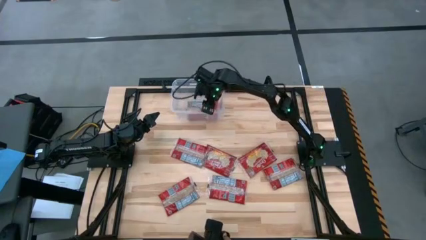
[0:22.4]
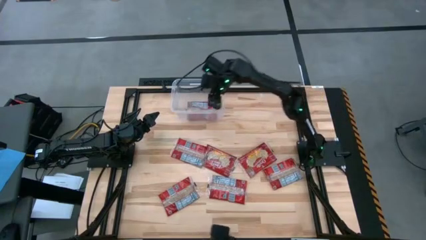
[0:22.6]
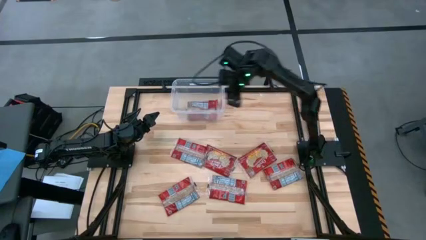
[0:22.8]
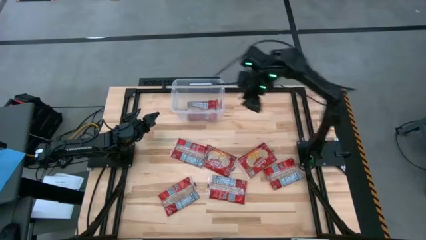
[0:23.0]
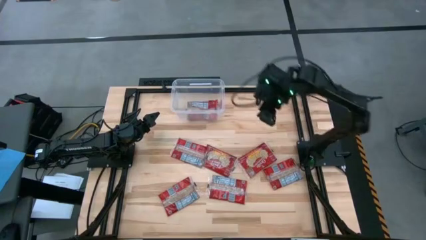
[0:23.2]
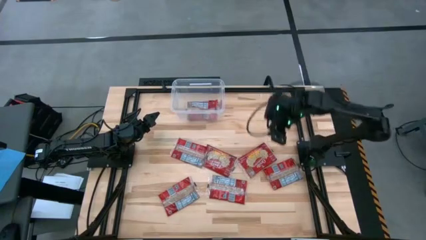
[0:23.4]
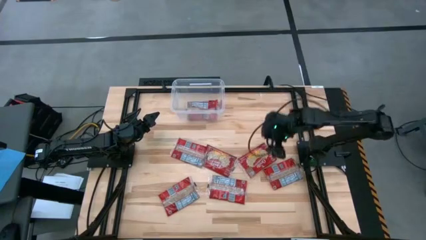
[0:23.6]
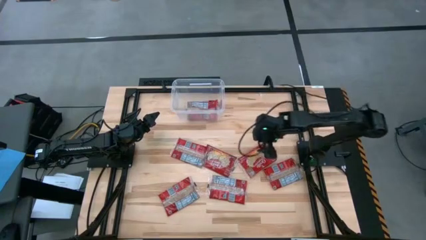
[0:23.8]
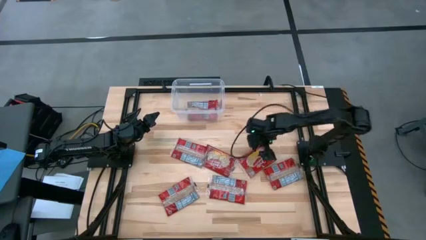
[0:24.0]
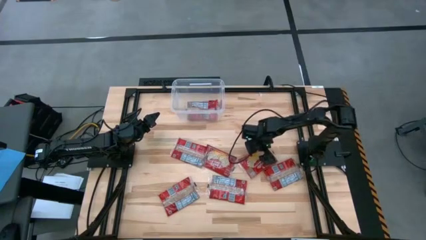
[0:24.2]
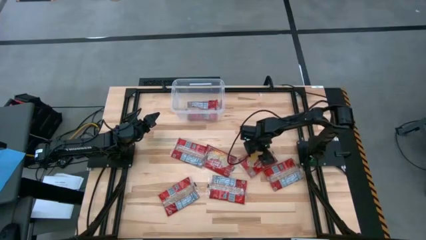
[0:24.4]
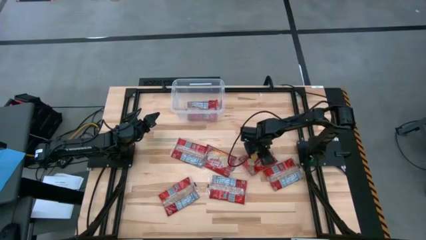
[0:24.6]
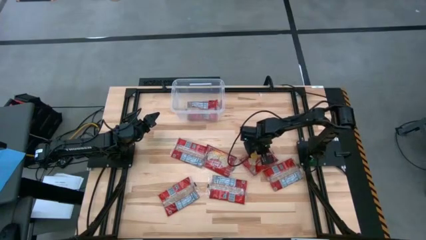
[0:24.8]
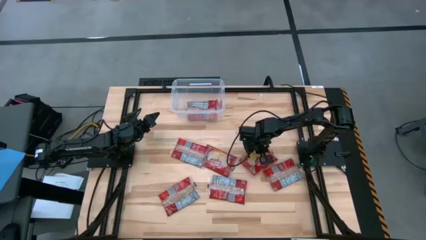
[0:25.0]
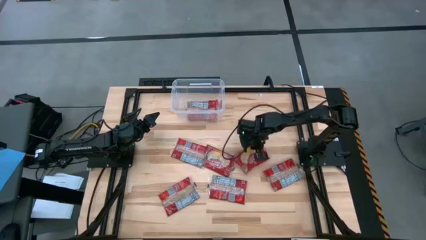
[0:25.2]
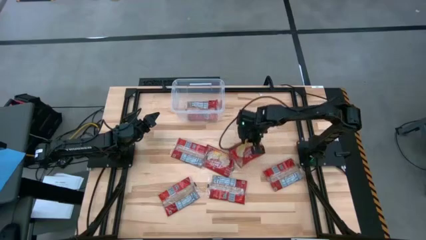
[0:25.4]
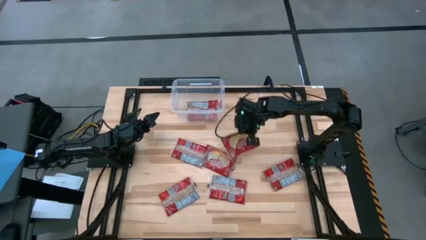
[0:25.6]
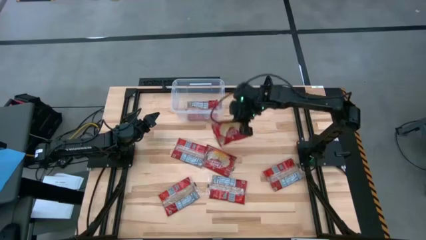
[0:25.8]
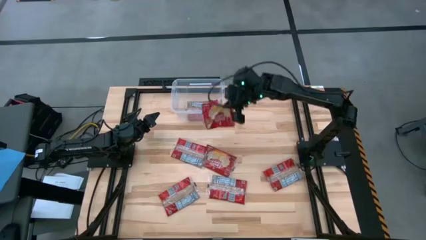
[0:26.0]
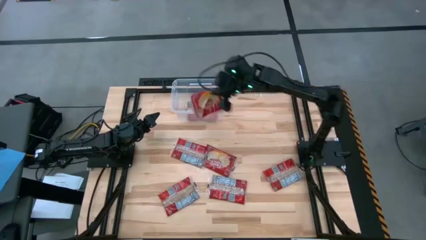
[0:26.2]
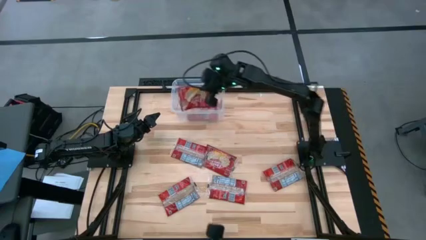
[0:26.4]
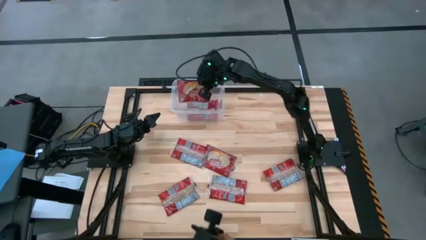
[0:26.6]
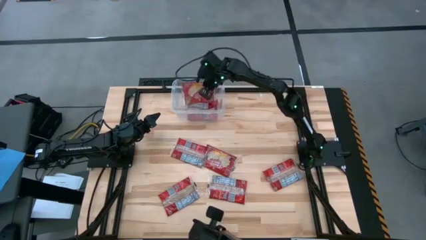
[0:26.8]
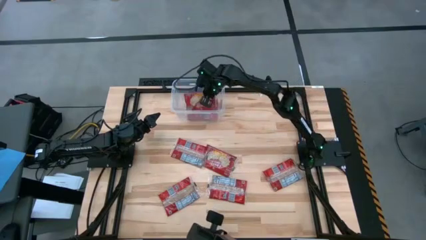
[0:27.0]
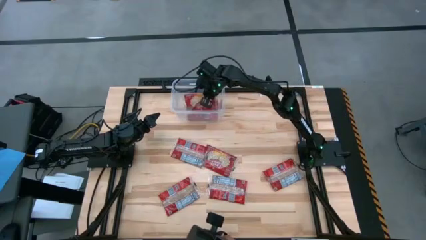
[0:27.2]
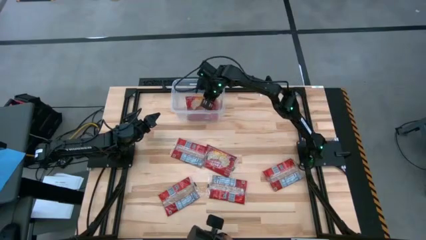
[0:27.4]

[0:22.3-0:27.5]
Task: Sort popcorn bags into baskets
Put the red popcorn bag into the transparent bin

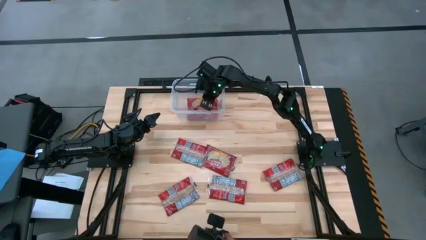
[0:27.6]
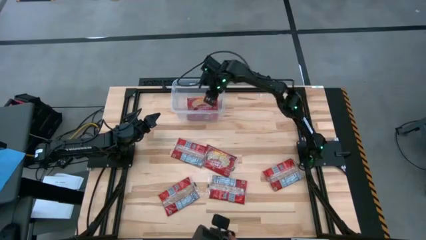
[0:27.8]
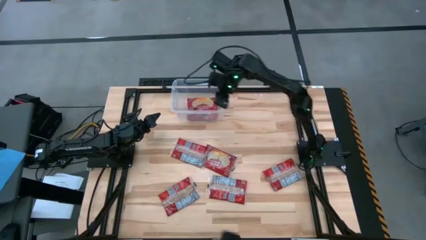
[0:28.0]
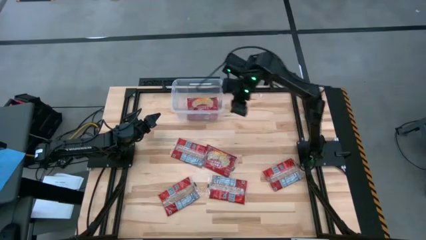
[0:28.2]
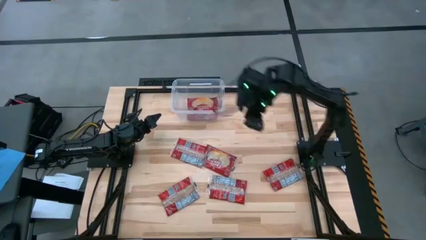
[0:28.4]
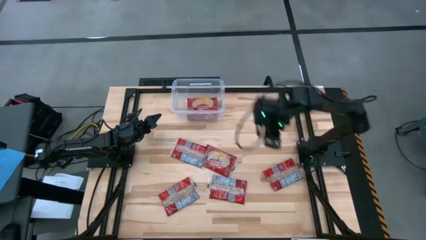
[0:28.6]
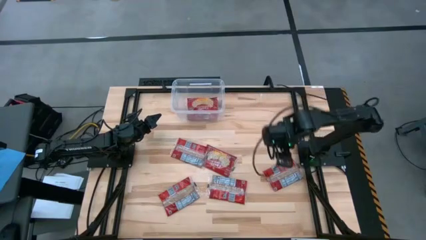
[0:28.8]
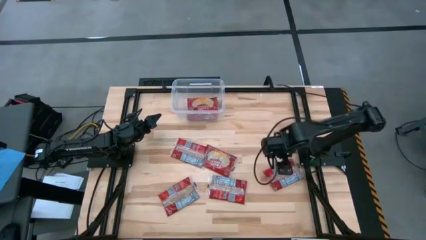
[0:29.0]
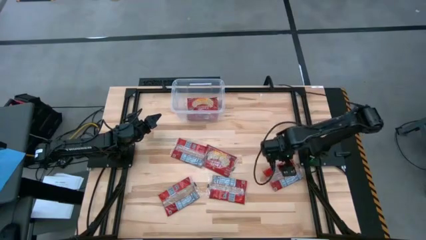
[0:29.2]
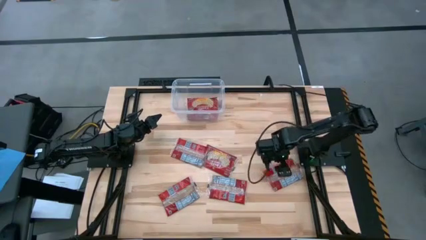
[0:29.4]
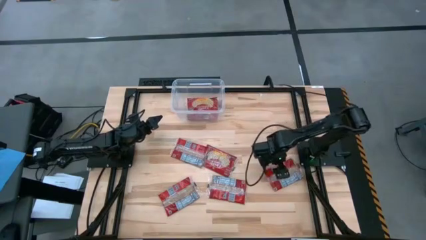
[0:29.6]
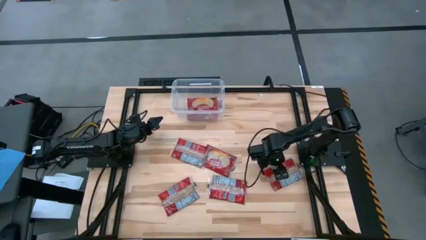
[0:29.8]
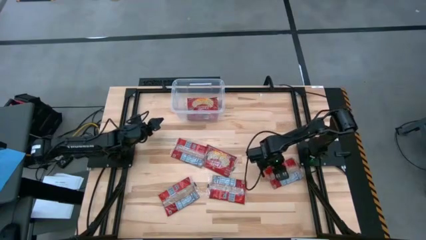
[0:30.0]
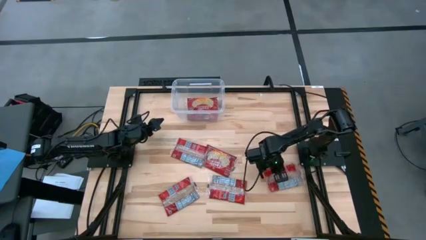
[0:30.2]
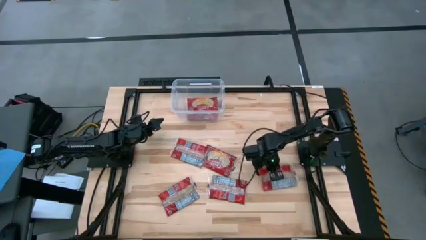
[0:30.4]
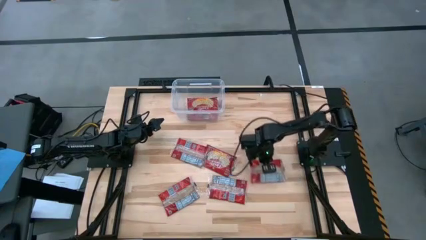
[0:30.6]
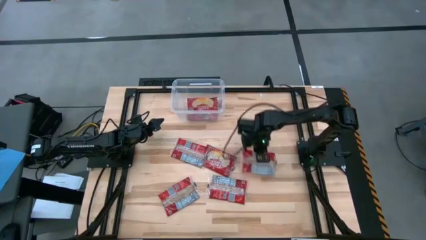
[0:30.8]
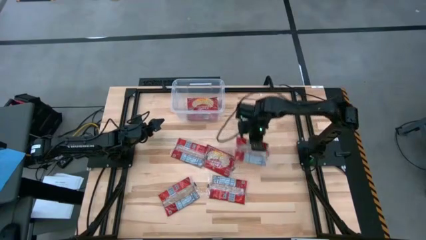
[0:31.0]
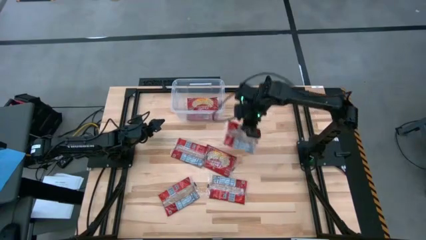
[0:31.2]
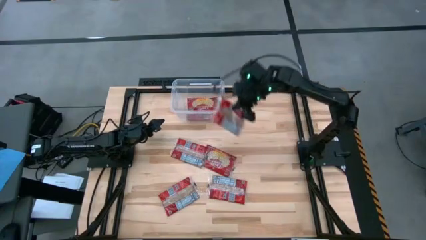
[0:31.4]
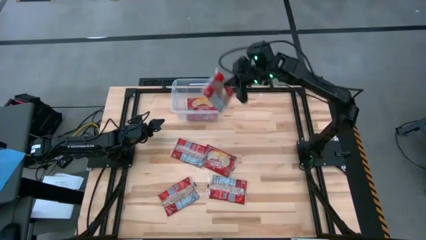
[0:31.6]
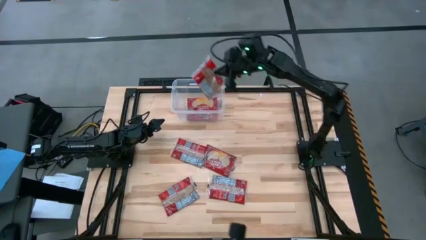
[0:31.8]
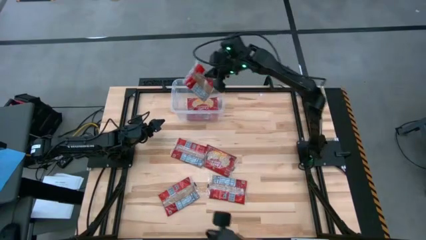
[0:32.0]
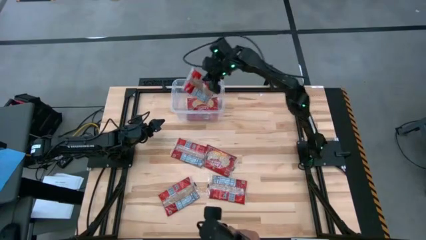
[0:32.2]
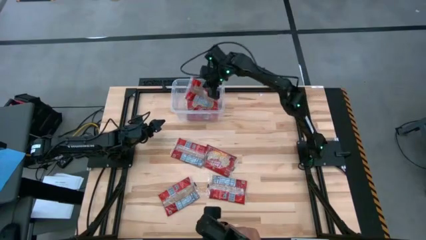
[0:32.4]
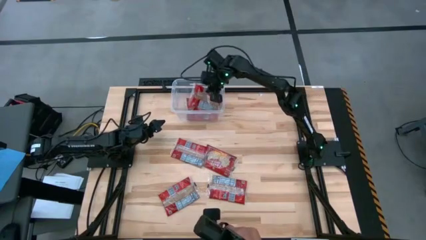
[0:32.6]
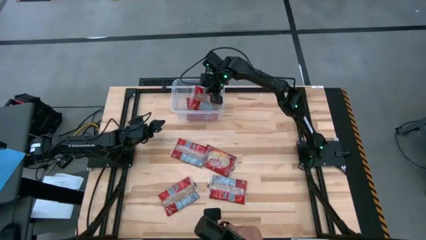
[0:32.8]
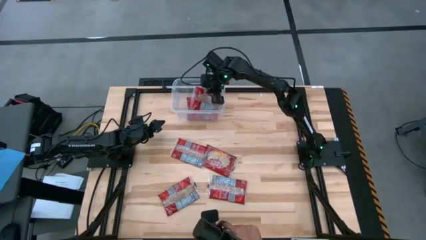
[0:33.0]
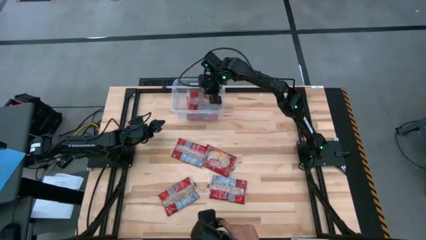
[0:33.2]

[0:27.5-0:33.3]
Put the red popcorn bag into the transparent bin

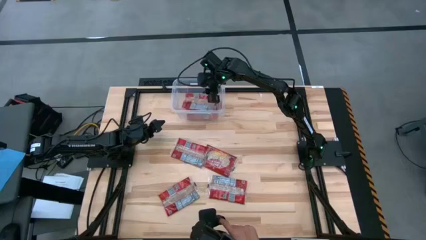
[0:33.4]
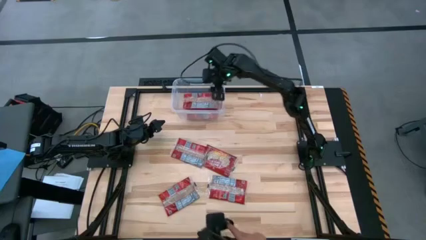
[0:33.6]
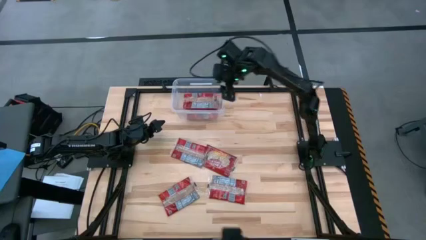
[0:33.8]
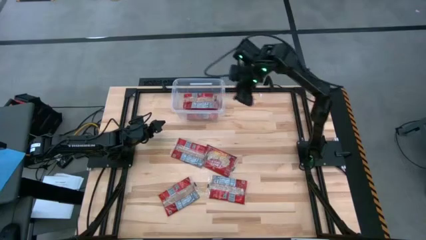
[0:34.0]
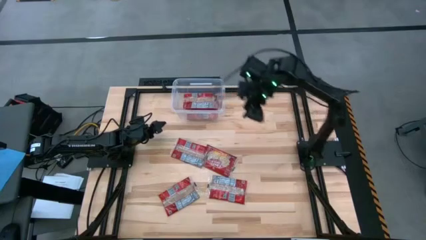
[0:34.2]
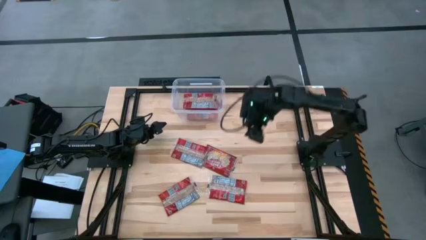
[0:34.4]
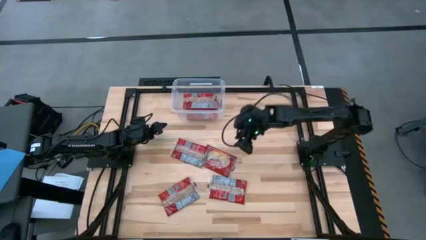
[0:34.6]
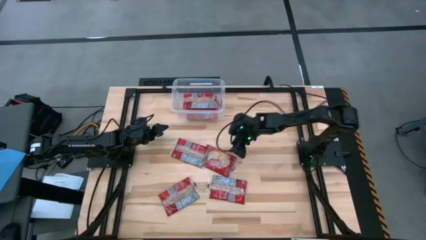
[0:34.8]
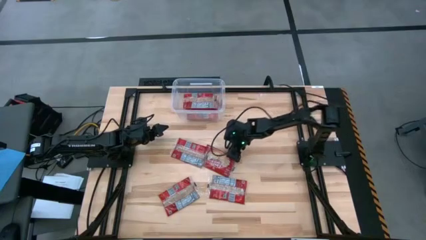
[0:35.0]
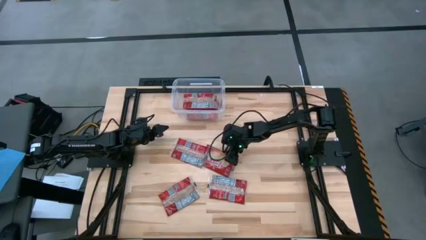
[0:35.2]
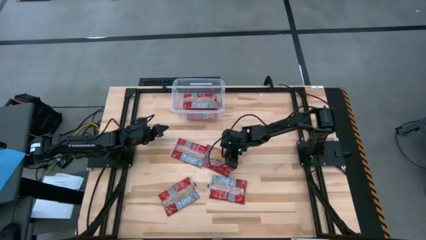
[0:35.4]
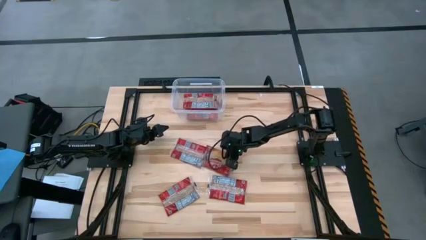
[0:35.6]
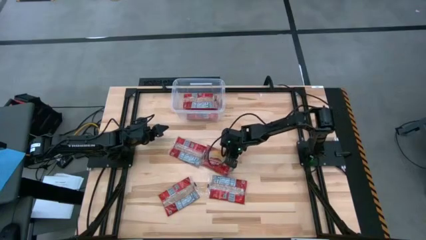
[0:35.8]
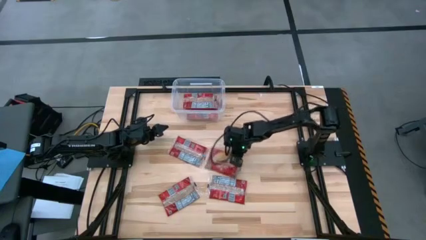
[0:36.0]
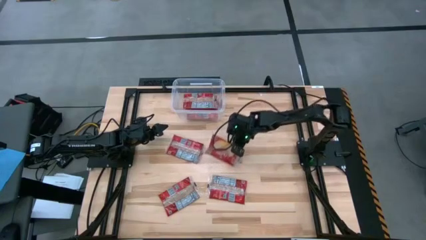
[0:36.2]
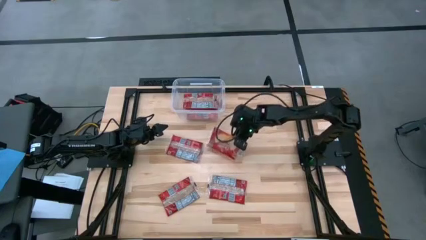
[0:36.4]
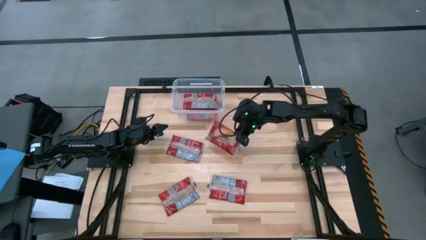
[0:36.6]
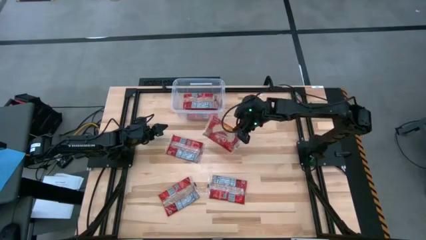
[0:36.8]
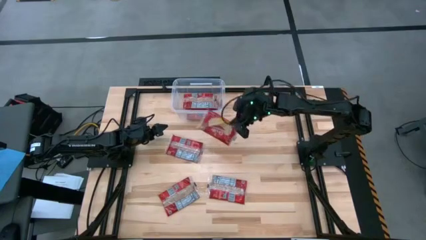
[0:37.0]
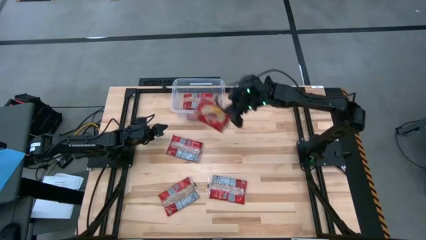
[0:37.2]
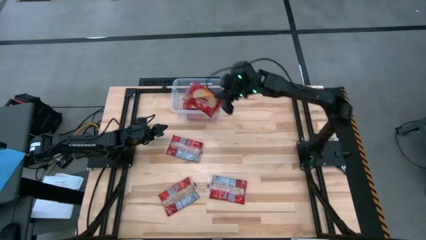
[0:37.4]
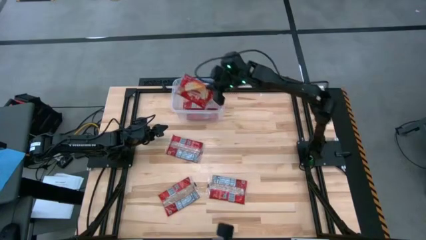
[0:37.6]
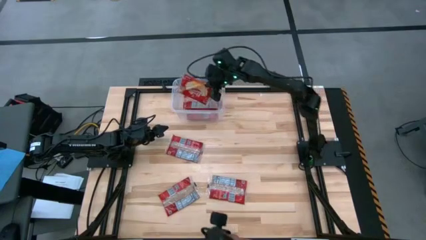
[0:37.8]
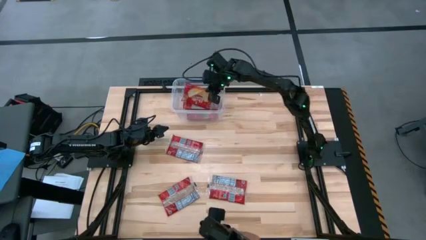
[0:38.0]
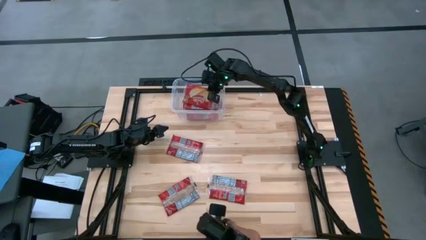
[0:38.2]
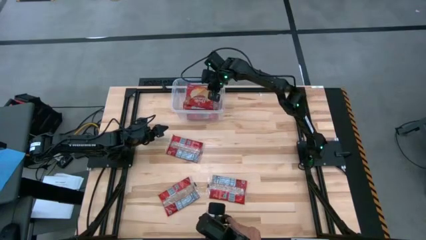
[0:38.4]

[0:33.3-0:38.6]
Put the red popcorn bag into the transparent bin
